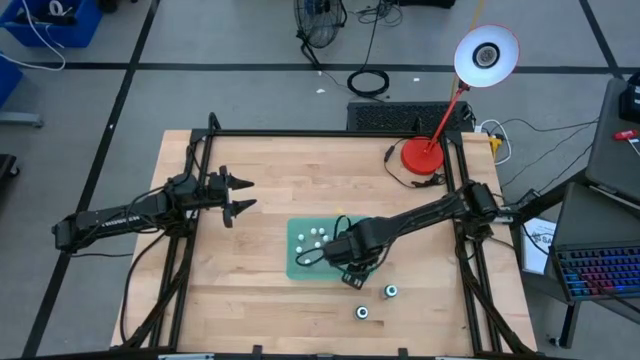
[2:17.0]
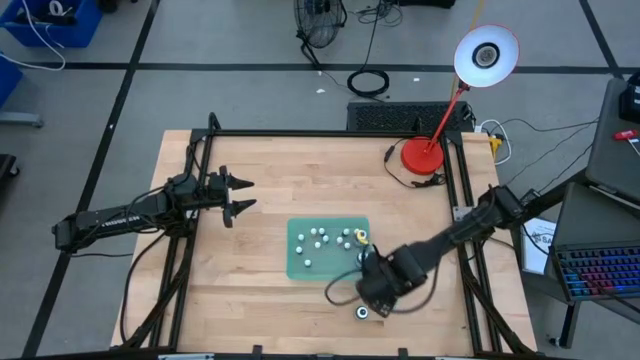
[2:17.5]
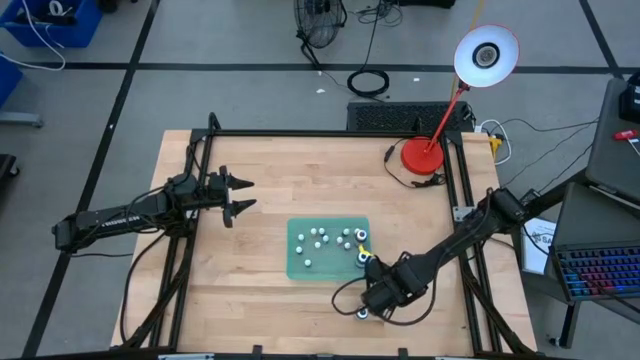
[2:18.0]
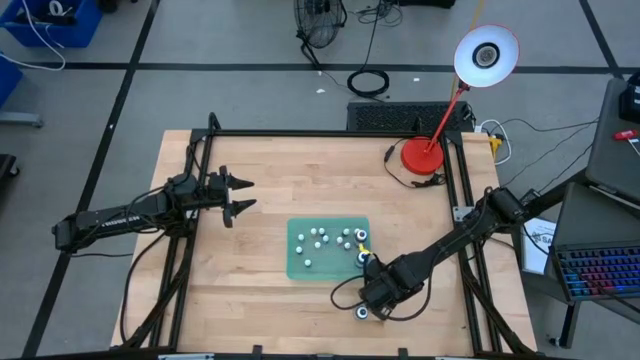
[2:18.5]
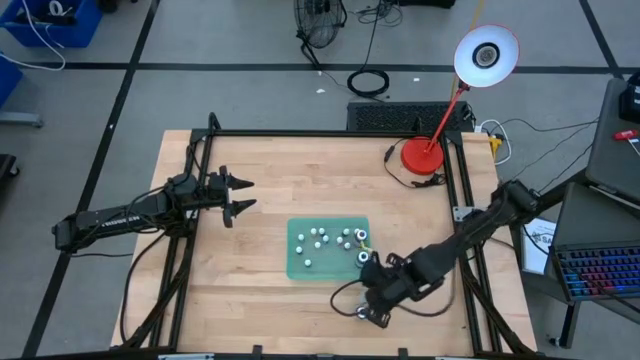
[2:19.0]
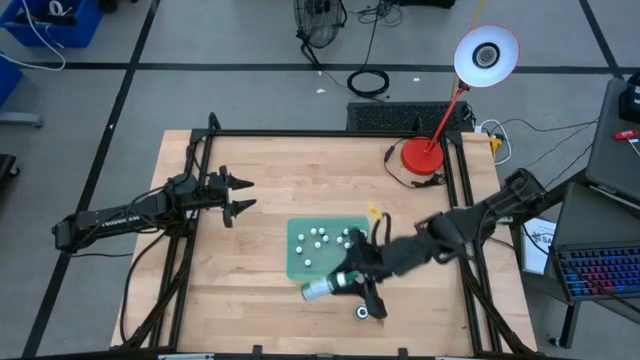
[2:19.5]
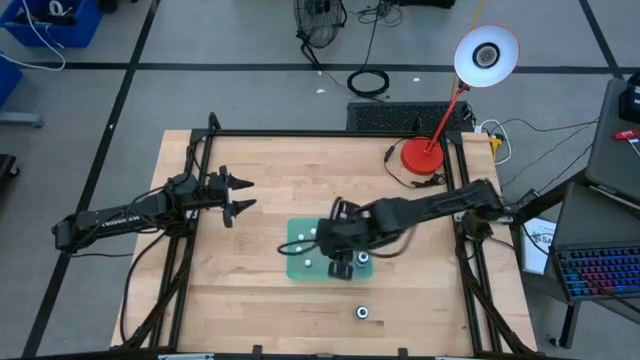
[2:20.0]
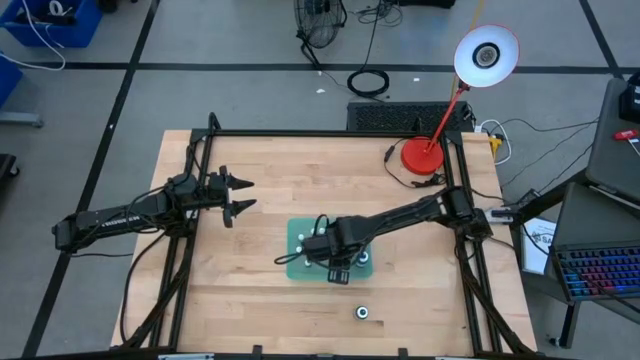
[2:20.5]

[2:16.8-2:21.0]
Task: Pick & Place food coloring
Put the large green food coloring bottle into the blue bin

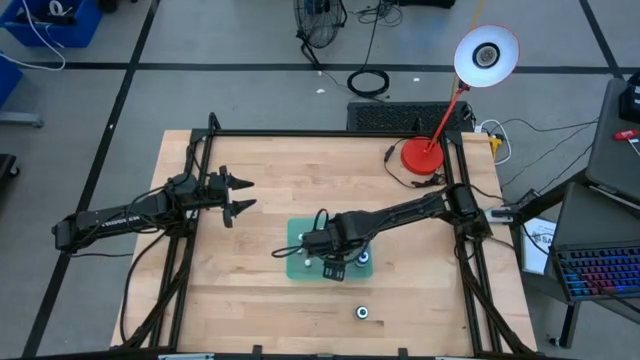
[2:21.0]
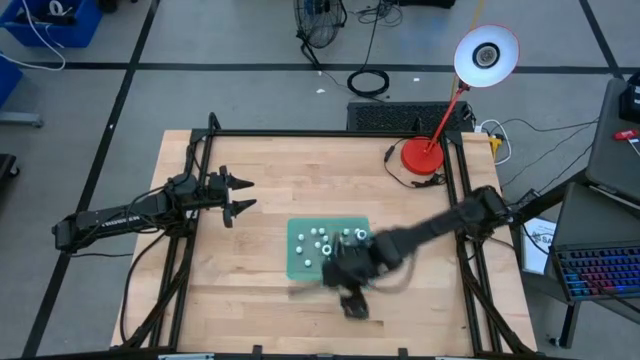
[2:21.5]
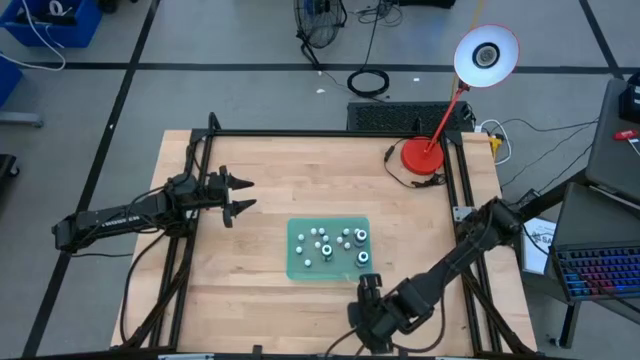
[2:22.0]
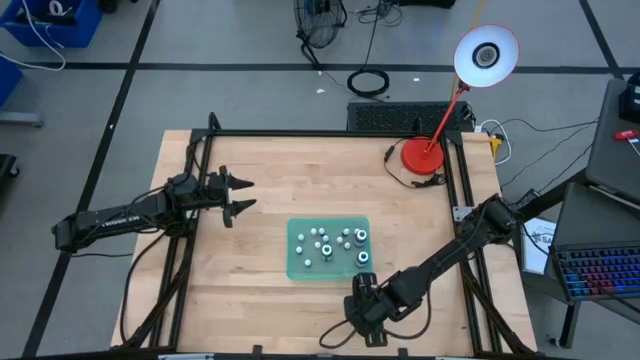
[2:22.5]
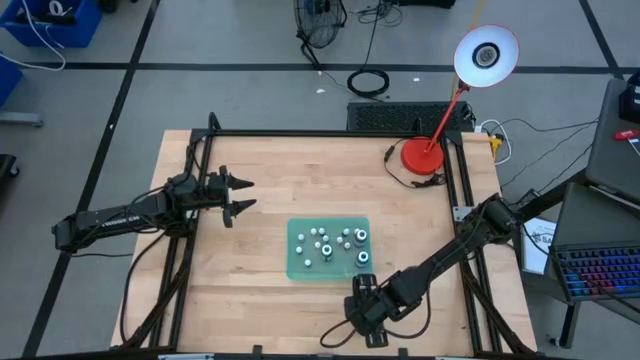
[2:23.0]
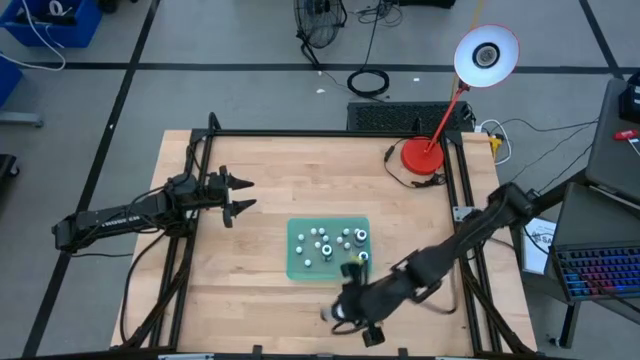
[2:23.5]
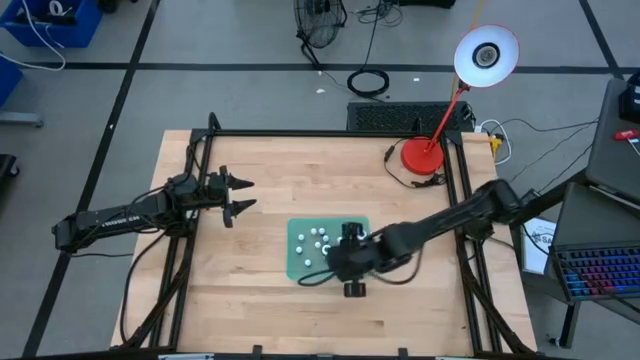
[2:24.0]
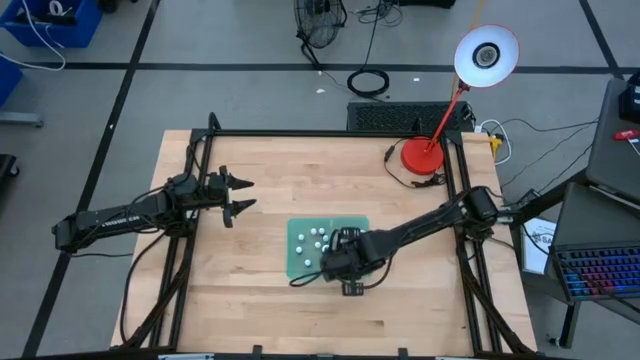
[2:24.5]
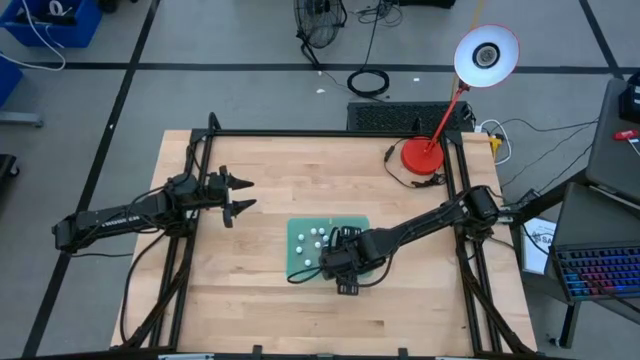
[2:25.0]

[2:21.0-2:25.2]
Put the large black food coloring bottle into the blue bin

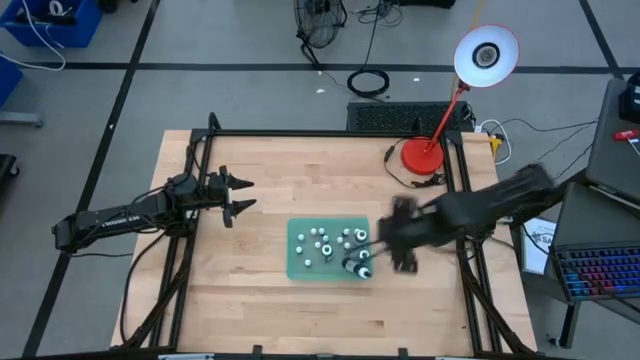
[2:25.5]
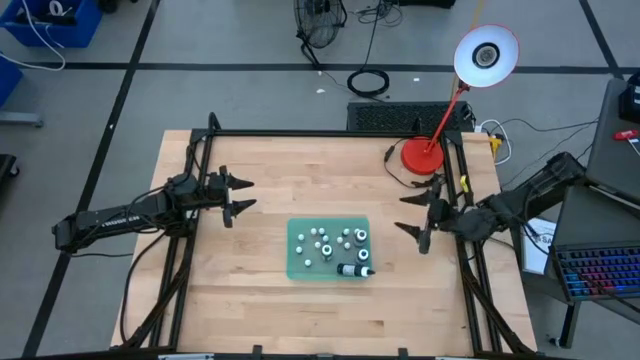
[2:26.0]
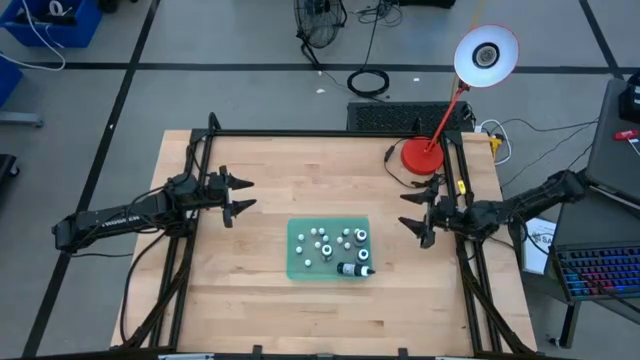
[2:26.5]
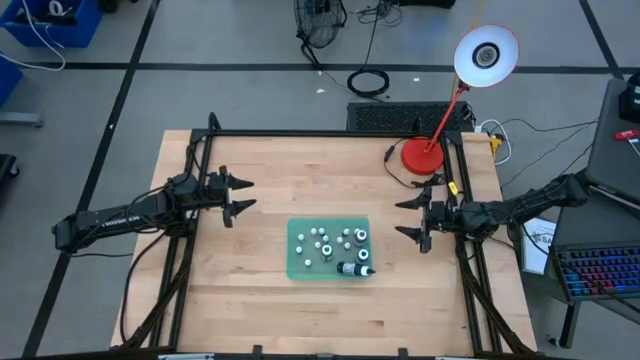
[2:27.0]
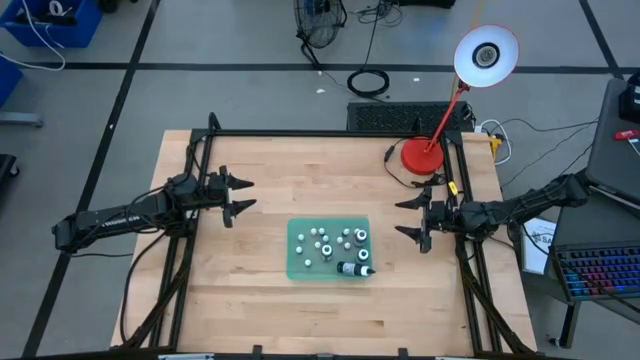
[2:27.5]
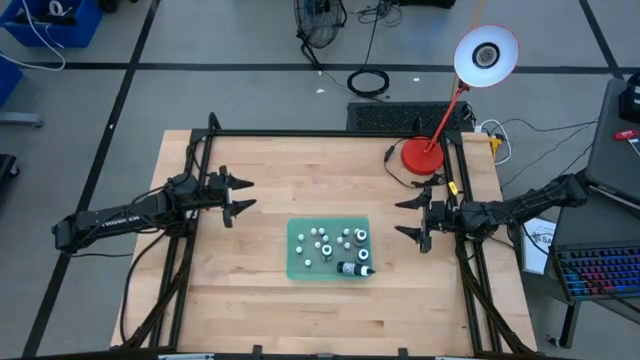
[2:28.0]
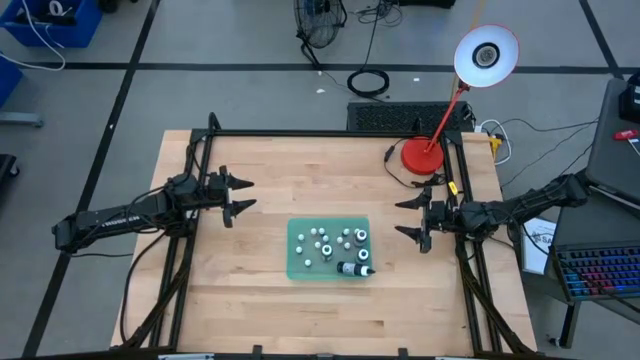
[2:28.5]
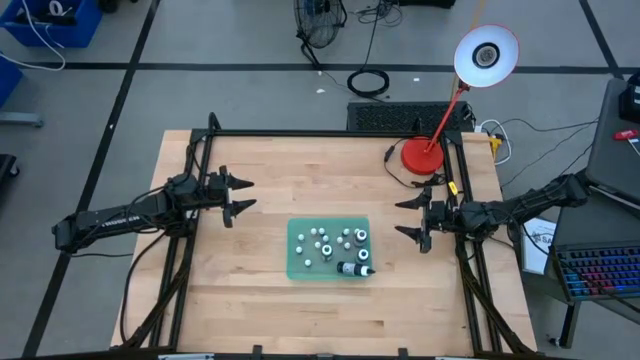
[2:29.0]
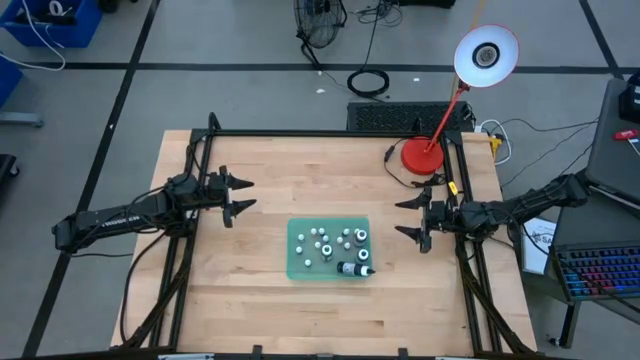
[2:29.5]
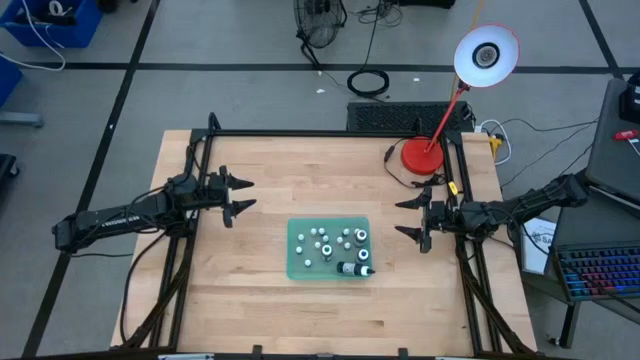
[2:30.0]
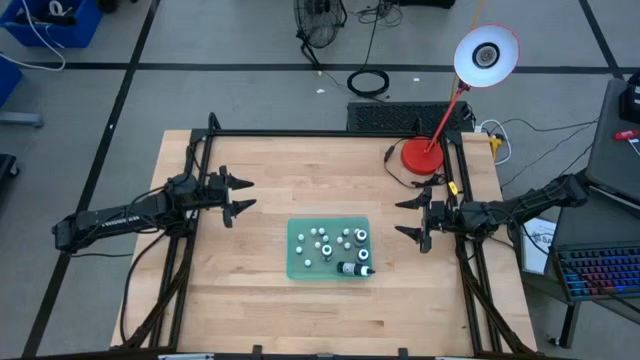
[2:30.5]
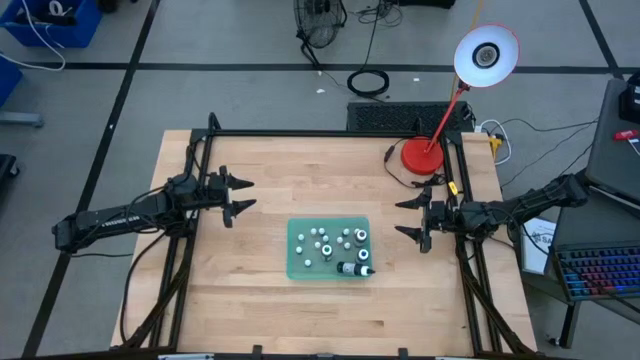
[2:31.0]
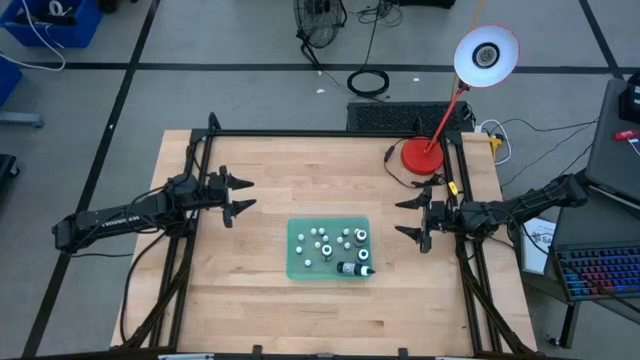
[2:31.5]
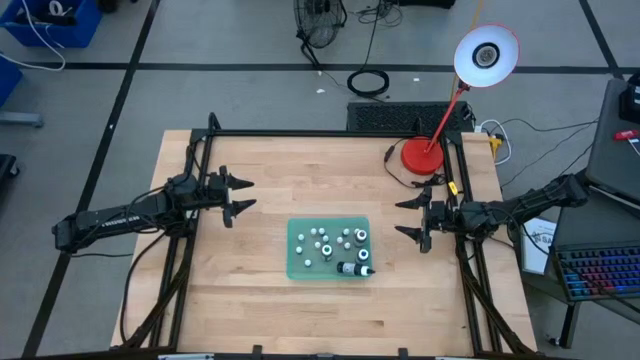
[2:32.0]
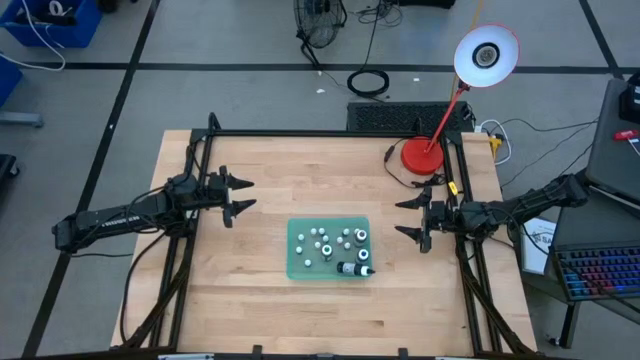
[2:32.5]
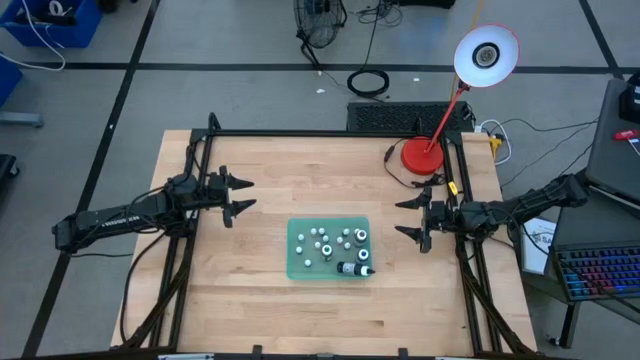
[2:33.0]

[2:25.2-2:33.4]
Return to home position

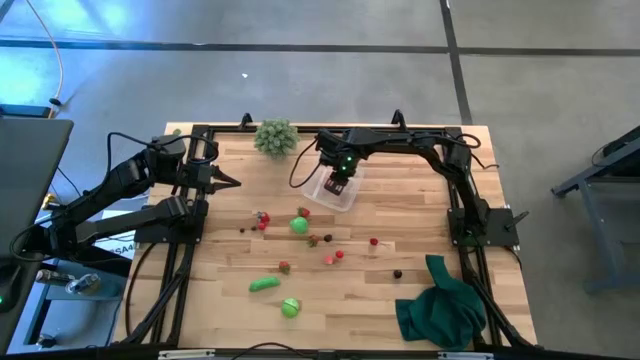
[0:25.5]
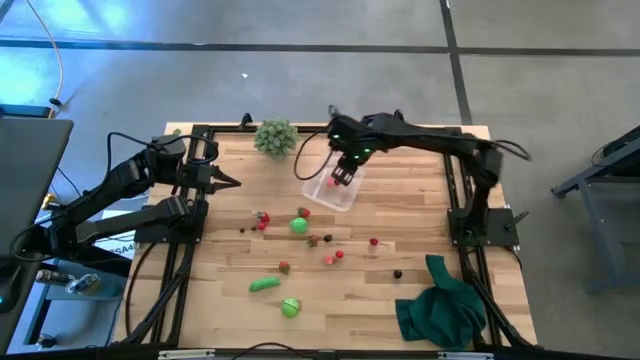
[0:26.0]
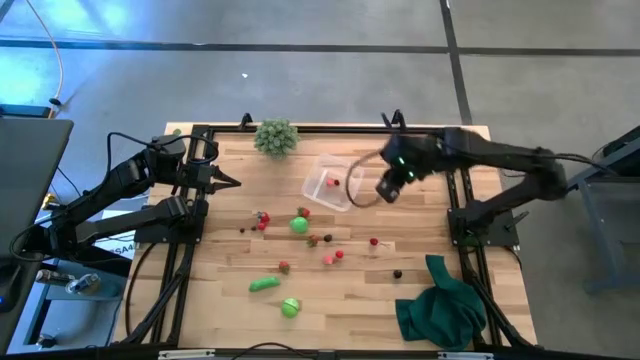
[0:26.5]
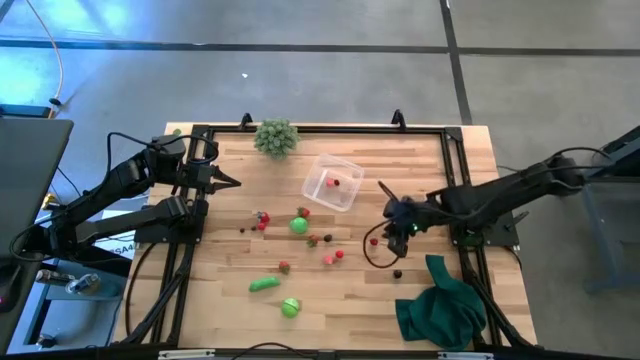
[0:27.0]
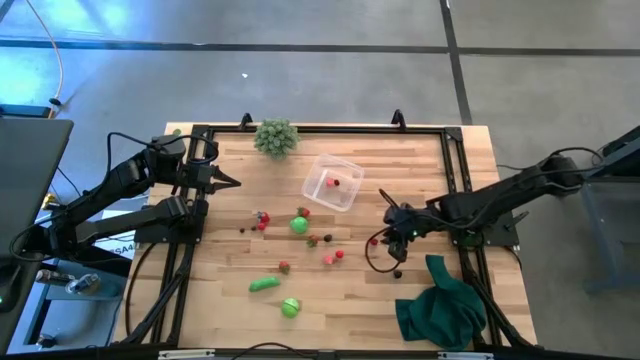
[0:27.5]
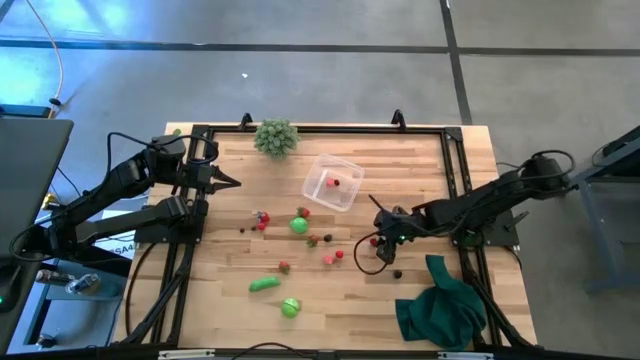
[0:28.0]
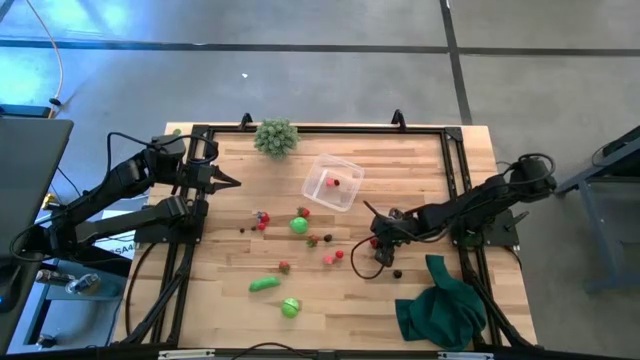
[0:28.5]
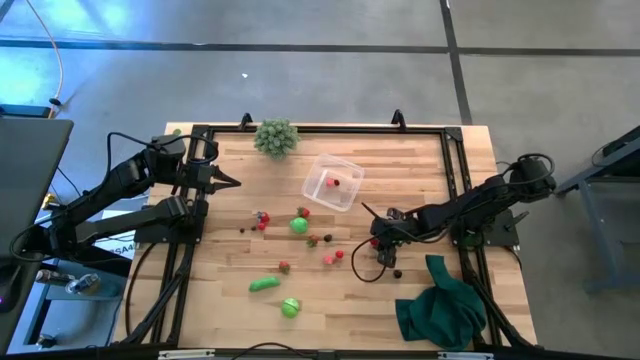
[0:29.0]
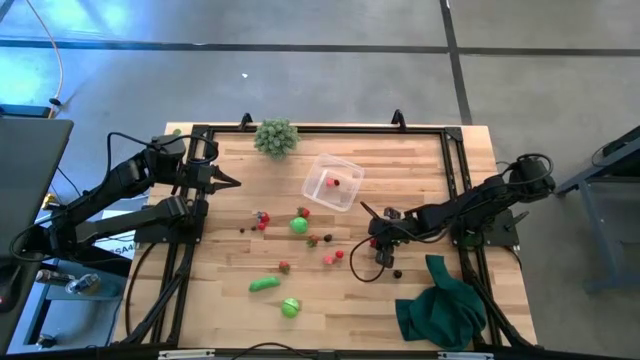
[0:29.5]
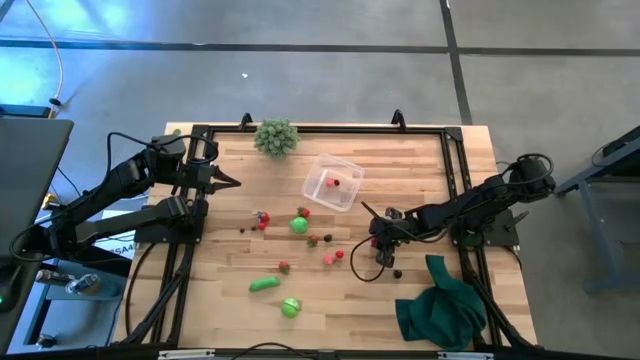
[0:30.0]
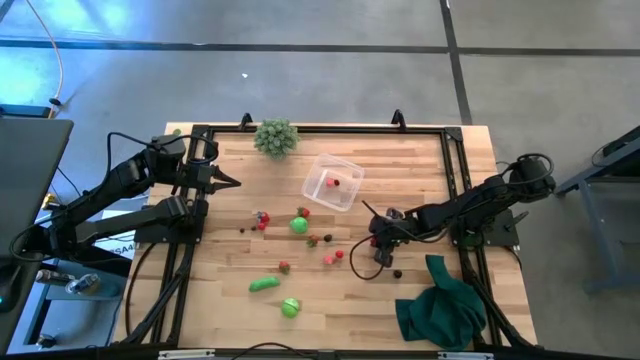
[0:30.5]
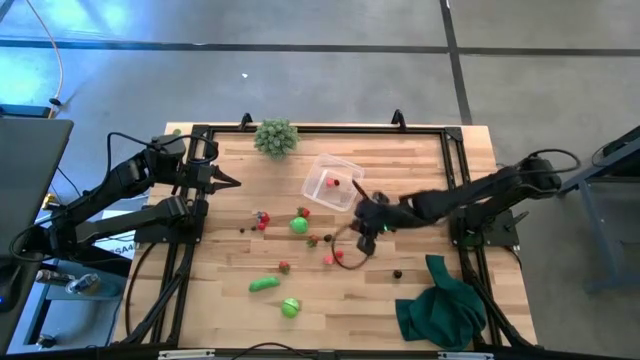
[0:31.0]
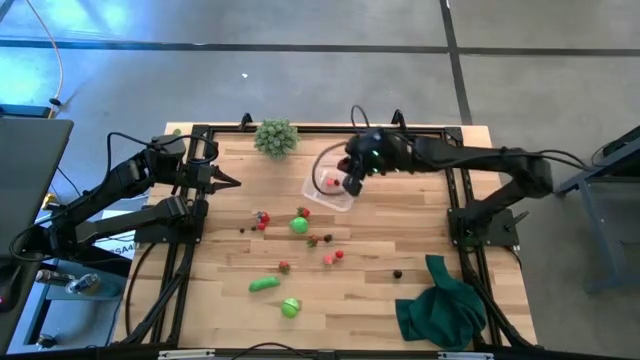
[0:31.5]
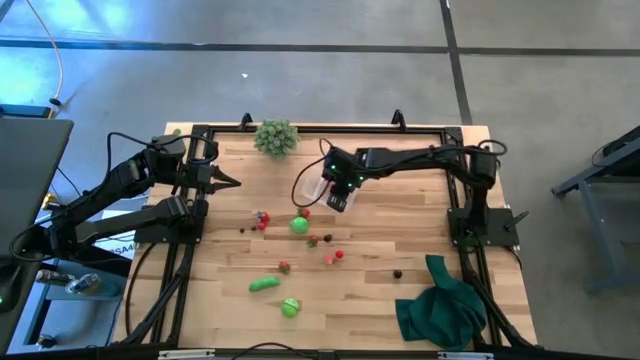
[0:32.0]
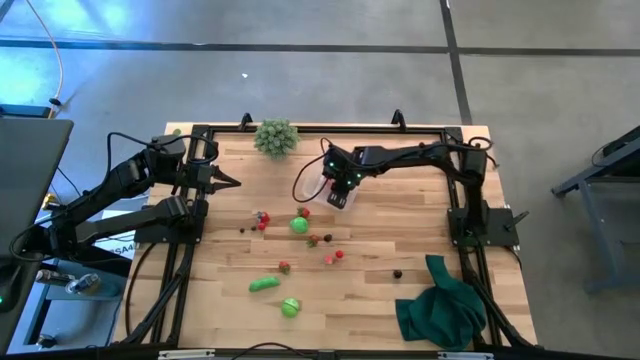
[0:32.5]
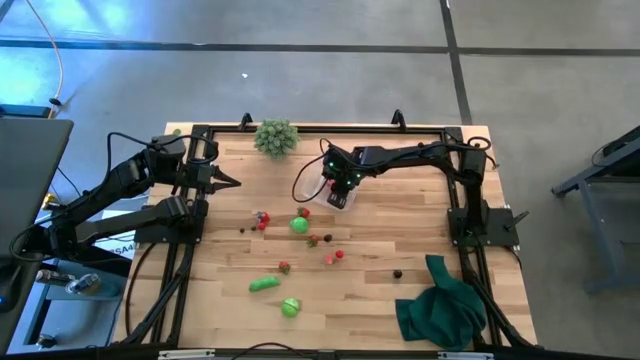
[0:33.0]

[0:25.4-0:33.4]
Task: Pick and placing Produce into tupperware
Put the red cherry into the transparent container
